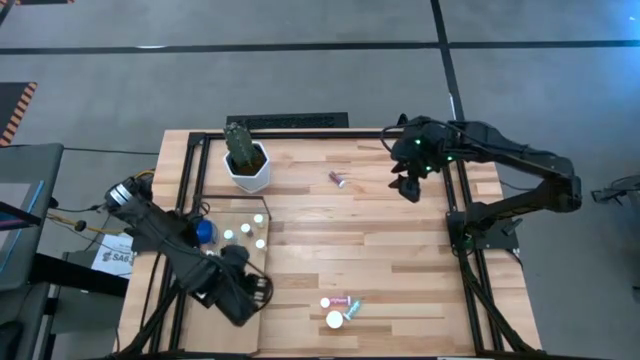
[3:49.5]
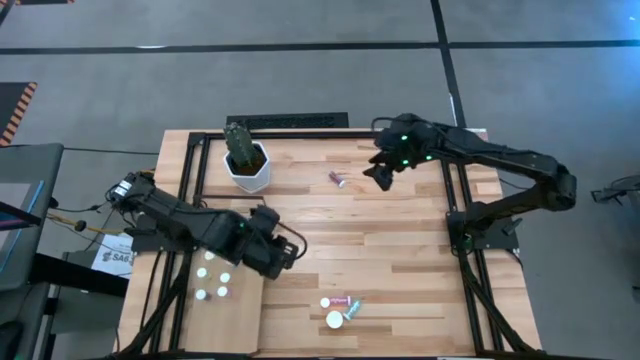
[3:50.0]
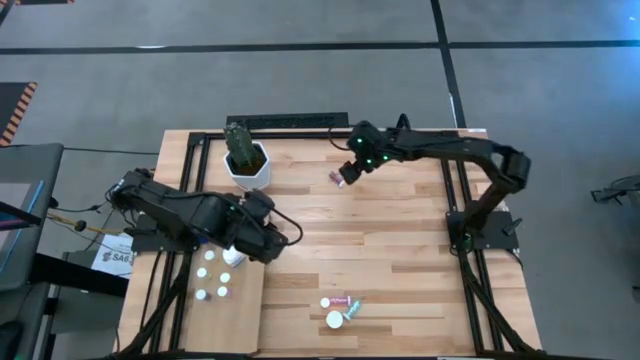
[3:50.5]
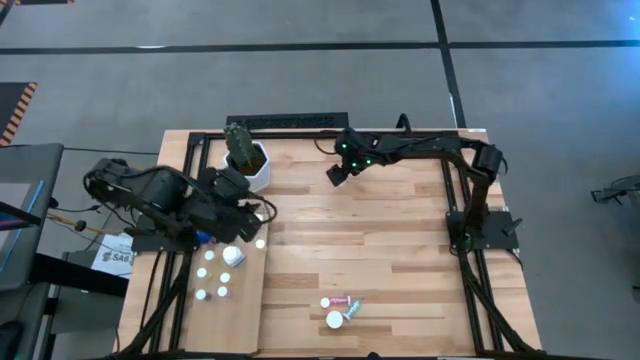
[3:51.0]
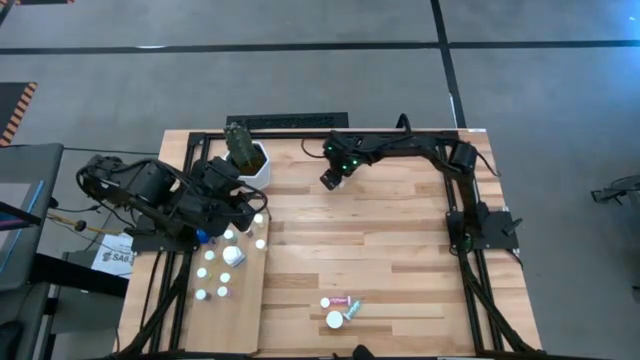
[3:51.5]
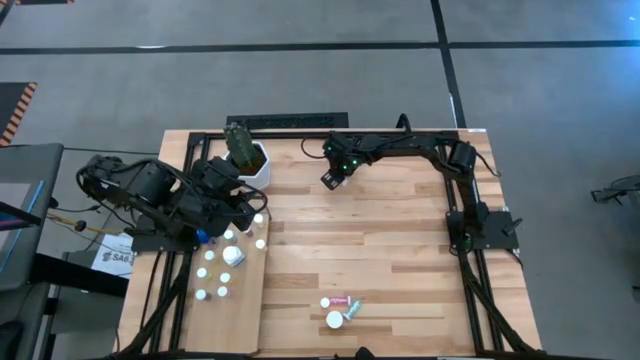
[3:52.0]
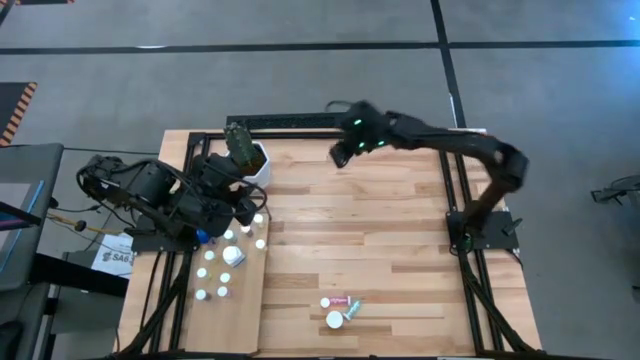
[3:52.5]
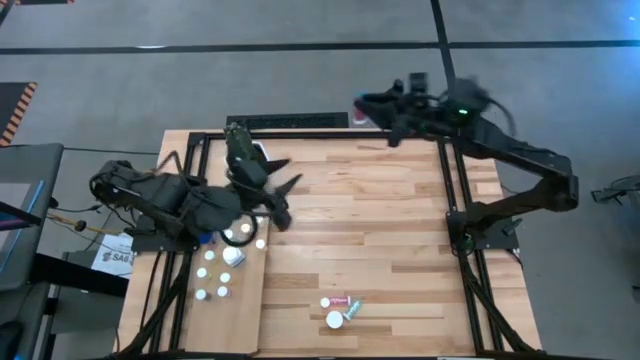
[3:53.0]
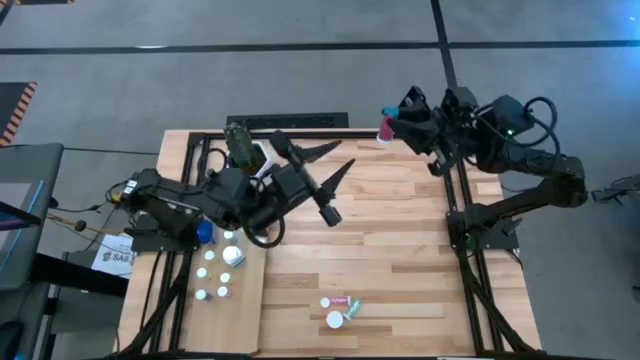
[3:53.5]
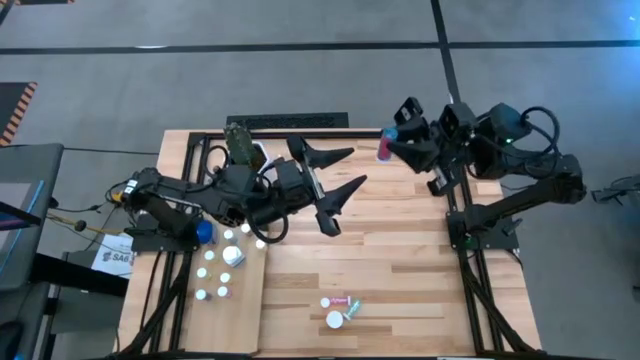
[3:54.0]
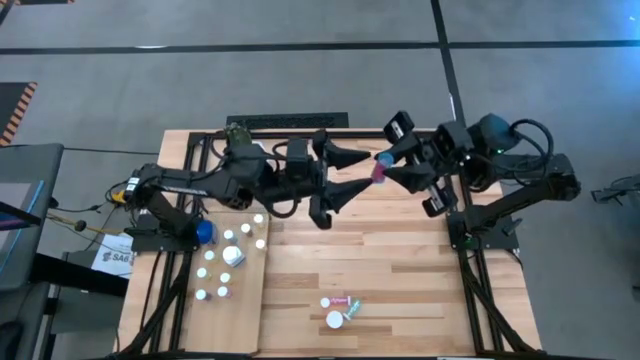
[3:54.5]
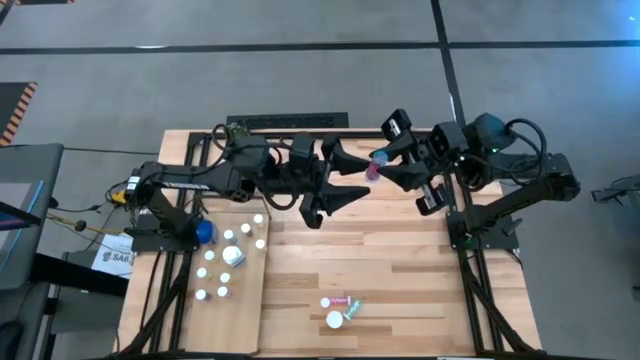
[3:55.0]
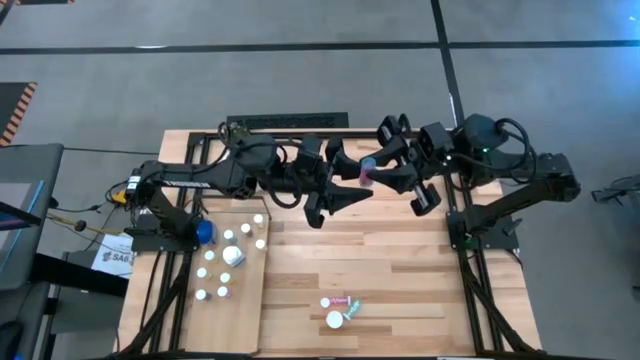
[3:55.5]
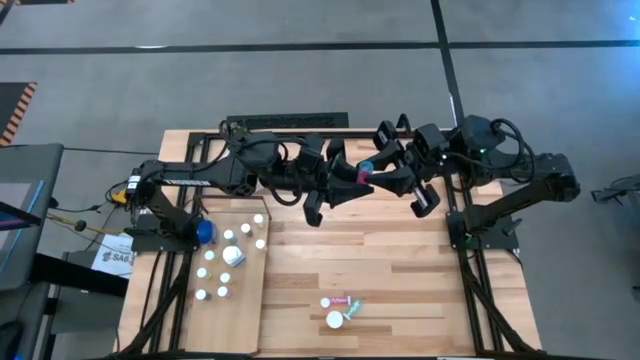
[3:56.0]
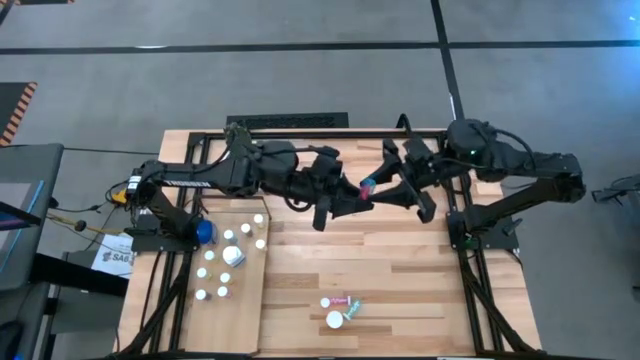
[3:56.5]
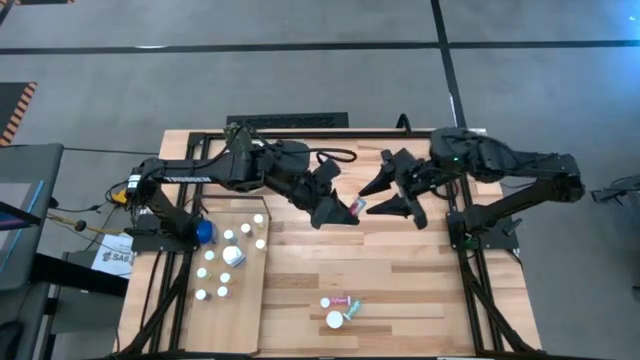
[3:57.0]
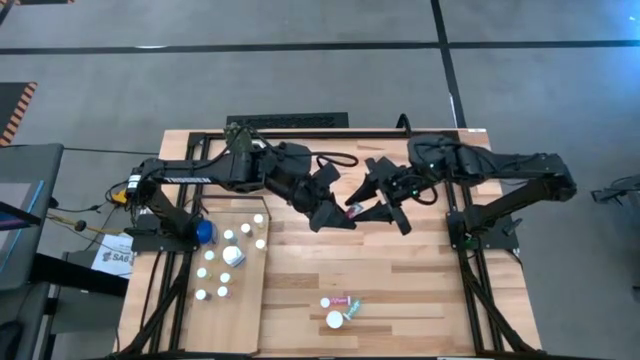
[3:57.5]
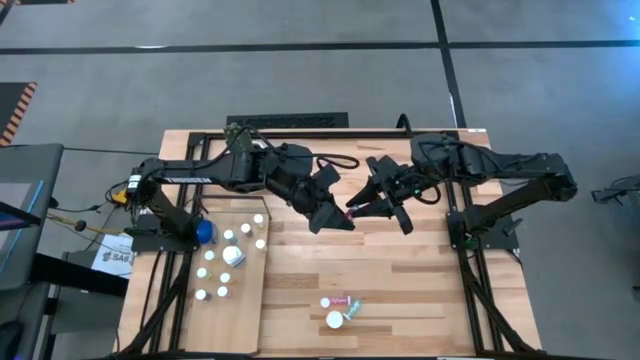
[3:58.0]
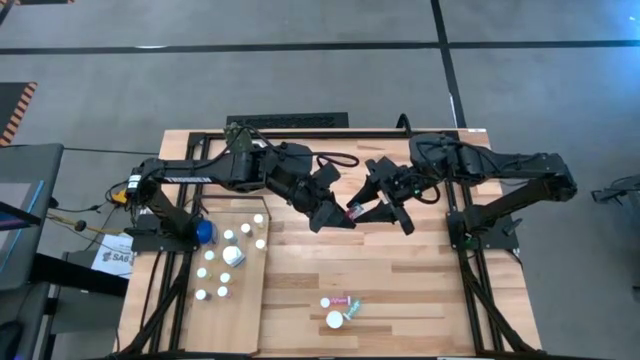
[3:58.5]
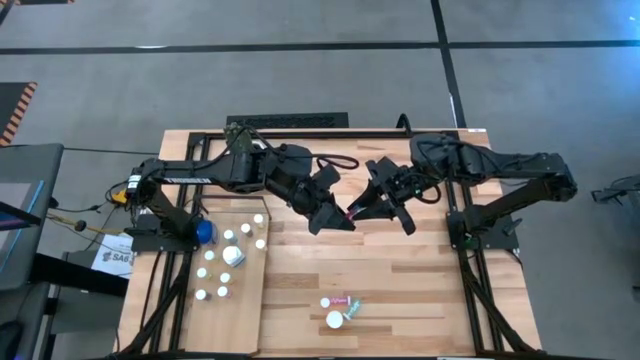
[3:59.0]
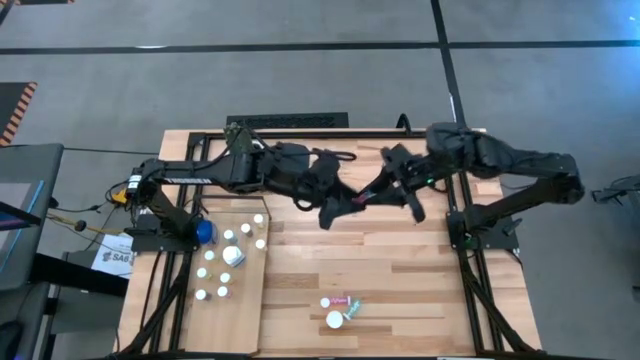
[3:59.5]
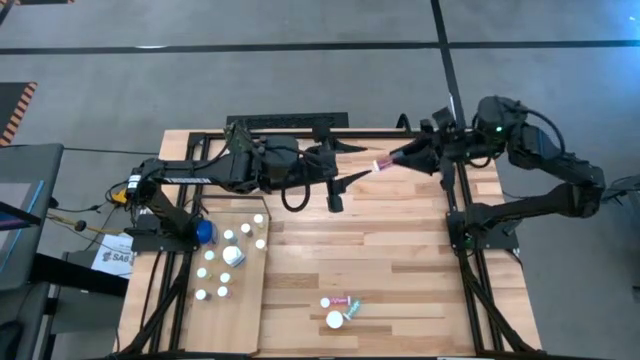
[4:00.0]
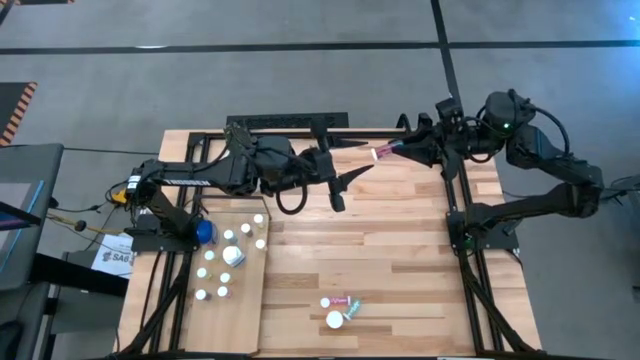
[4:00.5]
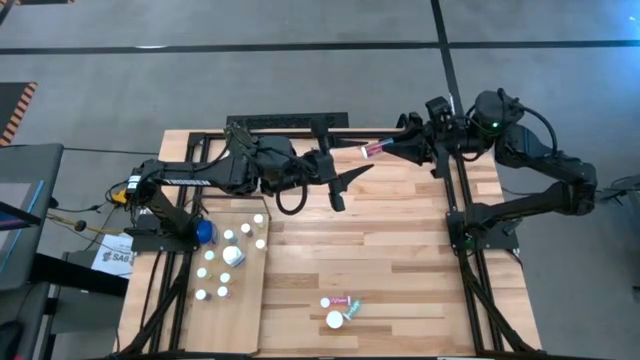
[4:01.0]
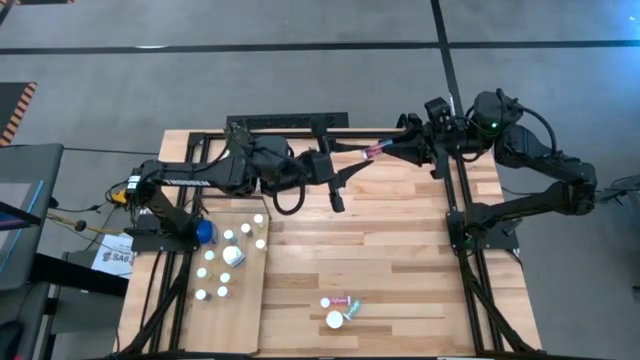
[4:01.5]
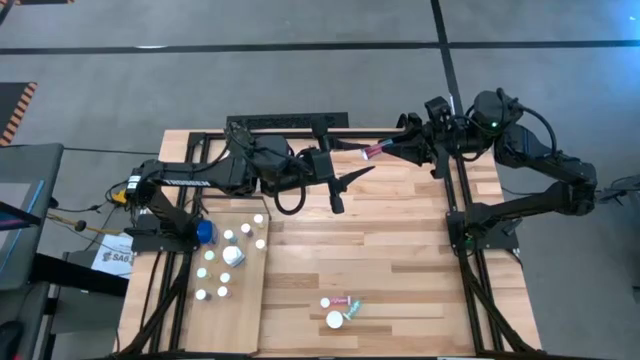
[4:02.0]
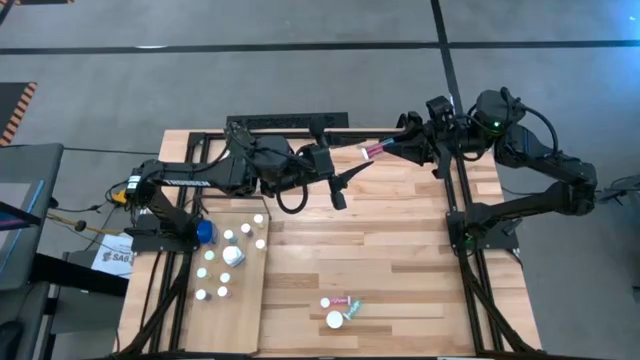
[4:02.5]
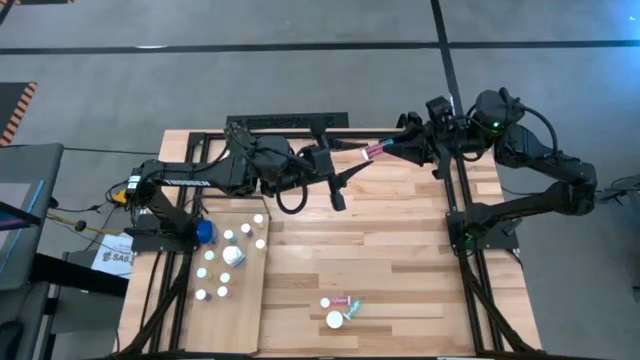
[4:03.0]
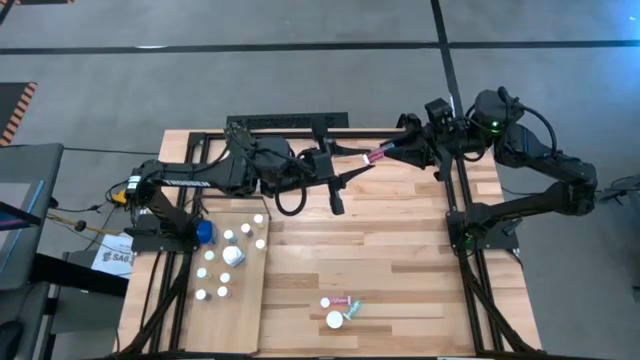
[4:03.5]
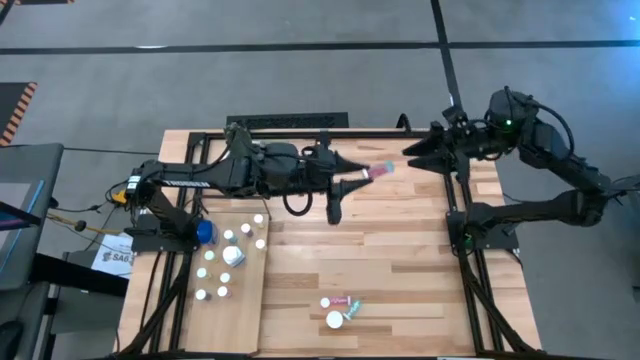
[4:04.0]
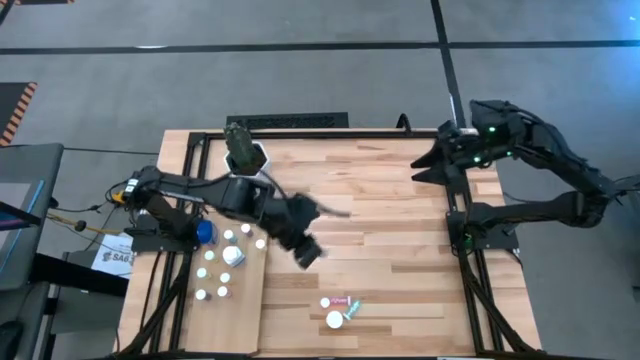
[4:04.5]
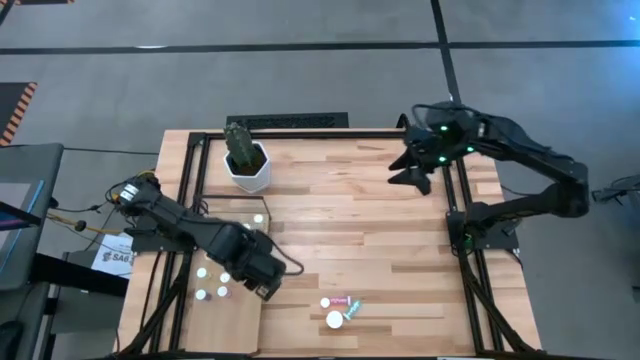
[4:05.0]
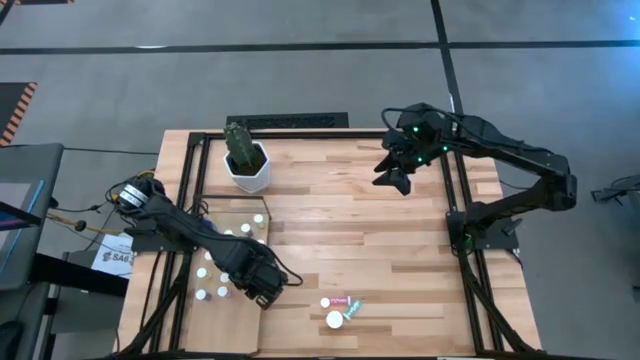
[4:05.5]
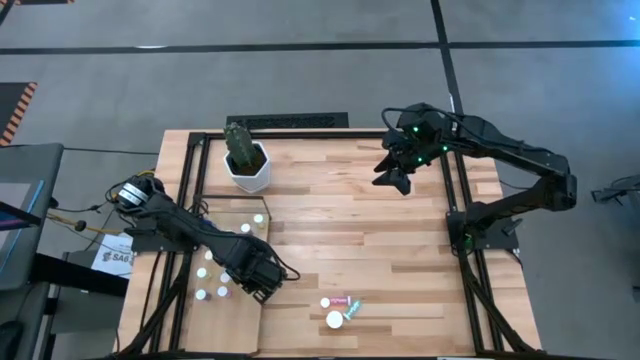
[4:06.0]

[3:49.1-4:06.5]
Task: Pick and place medicine bottles onto shelf by color
Put the light blue pill bottle on the shelf
